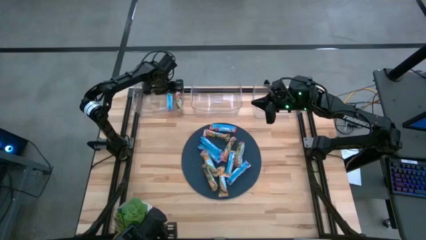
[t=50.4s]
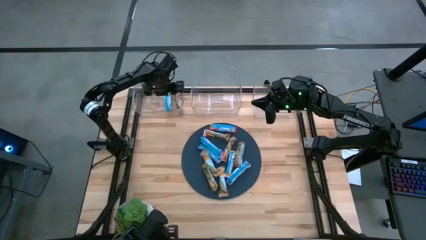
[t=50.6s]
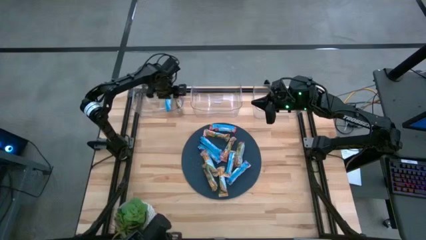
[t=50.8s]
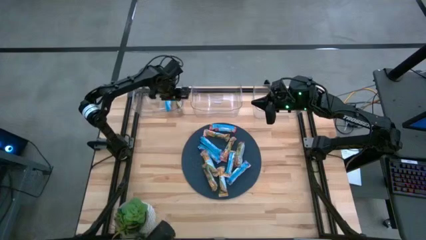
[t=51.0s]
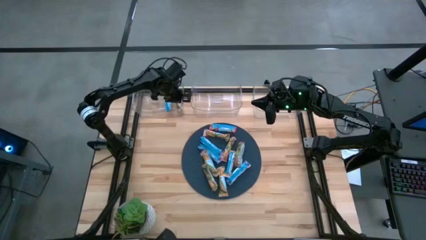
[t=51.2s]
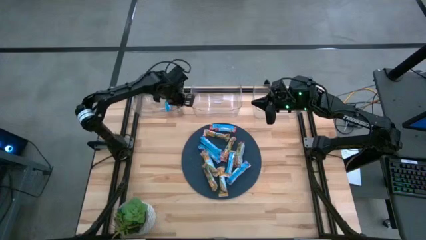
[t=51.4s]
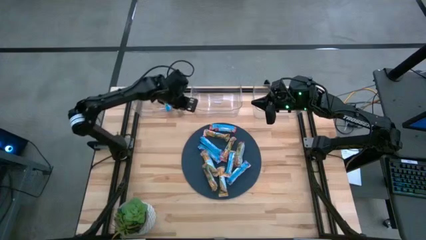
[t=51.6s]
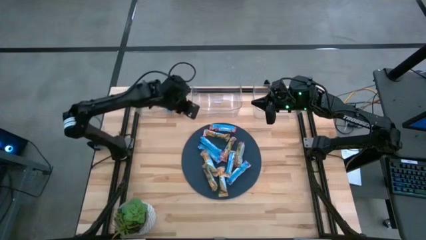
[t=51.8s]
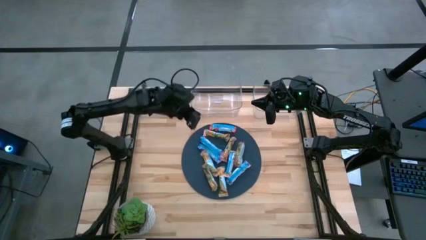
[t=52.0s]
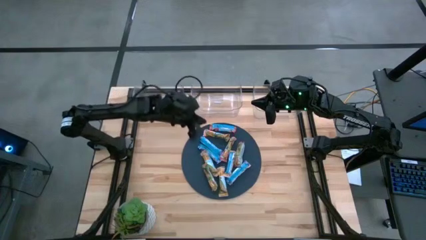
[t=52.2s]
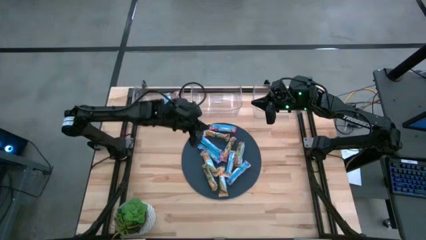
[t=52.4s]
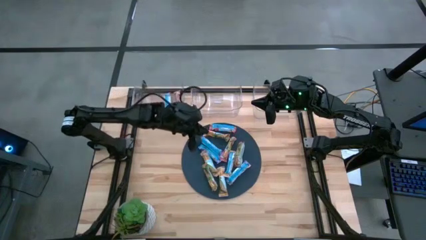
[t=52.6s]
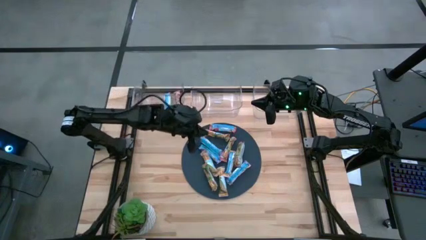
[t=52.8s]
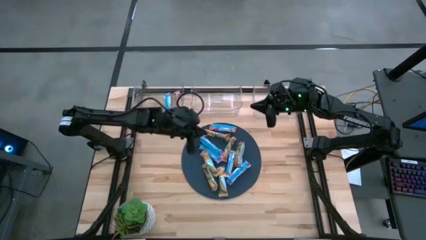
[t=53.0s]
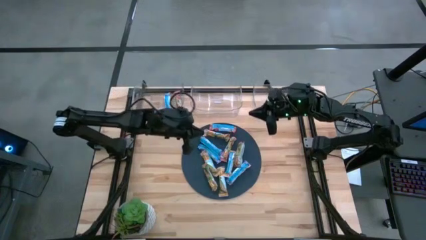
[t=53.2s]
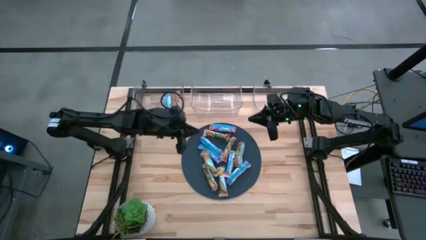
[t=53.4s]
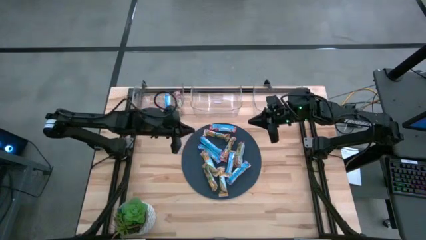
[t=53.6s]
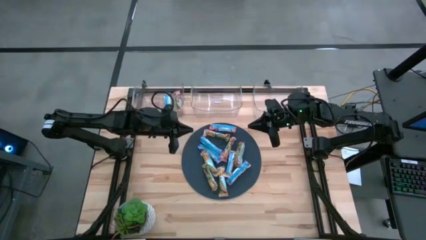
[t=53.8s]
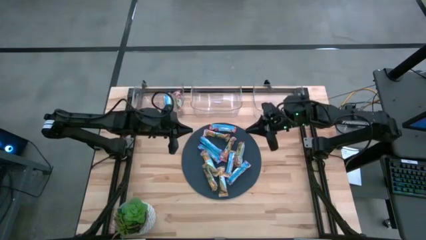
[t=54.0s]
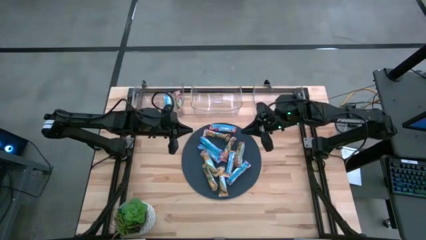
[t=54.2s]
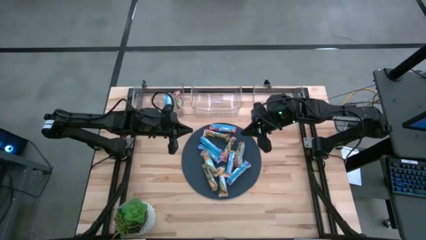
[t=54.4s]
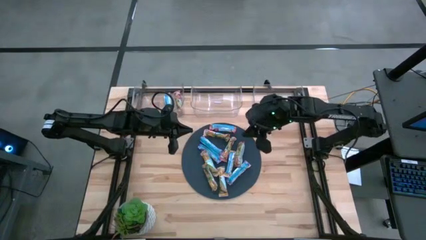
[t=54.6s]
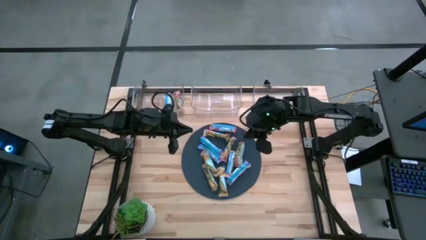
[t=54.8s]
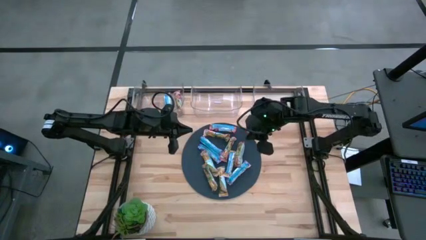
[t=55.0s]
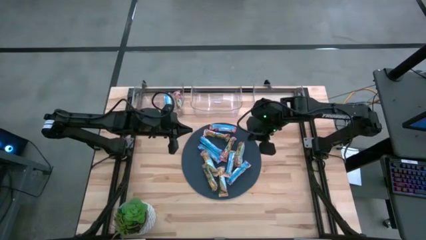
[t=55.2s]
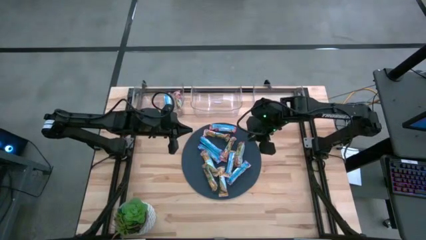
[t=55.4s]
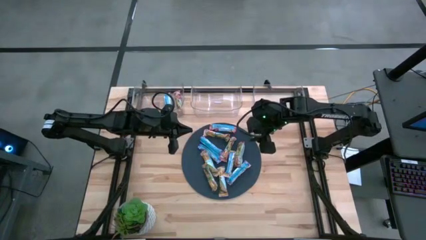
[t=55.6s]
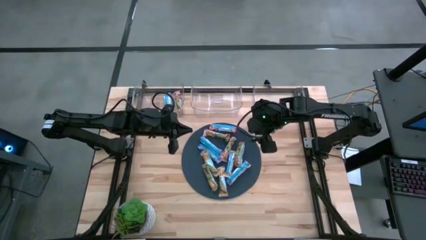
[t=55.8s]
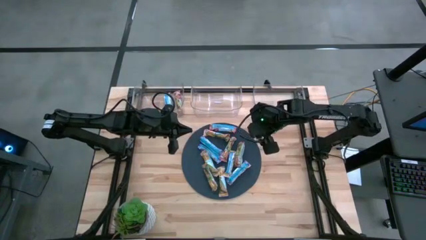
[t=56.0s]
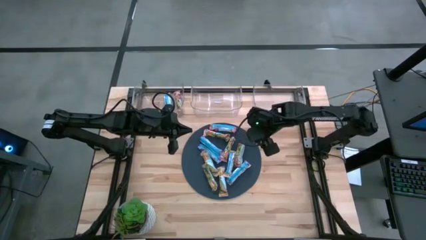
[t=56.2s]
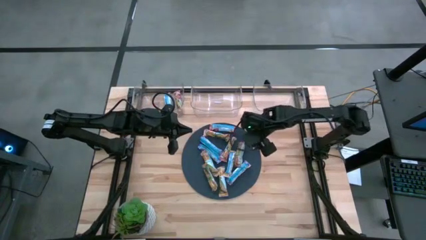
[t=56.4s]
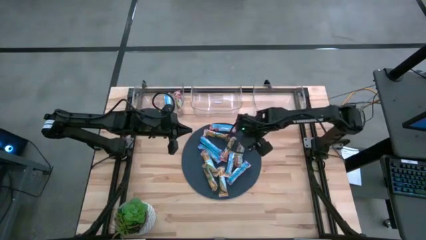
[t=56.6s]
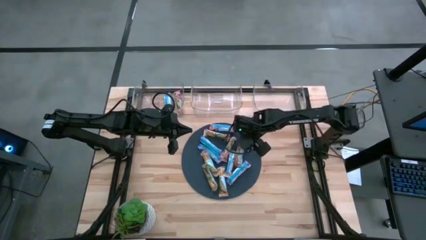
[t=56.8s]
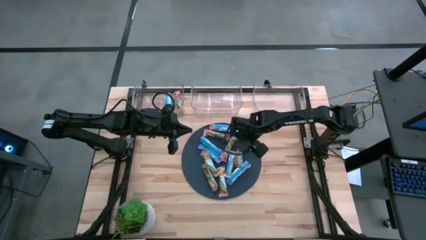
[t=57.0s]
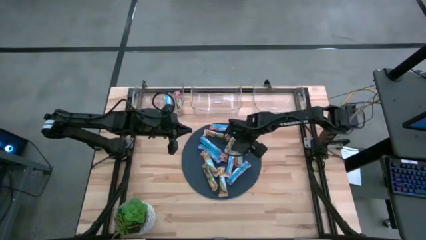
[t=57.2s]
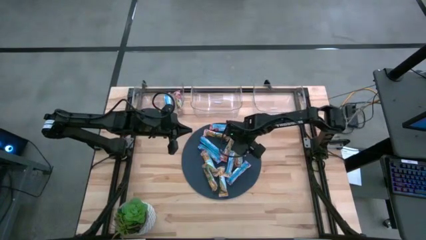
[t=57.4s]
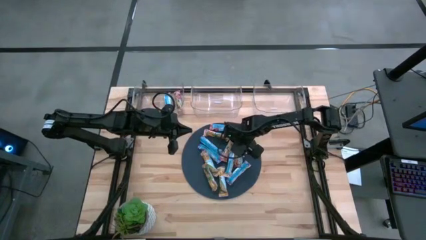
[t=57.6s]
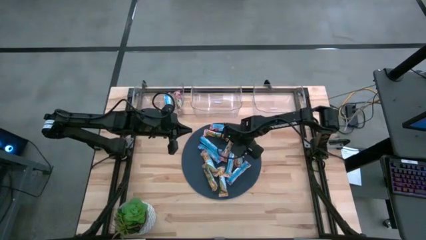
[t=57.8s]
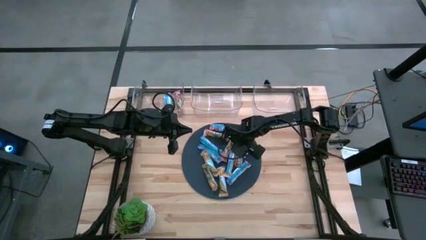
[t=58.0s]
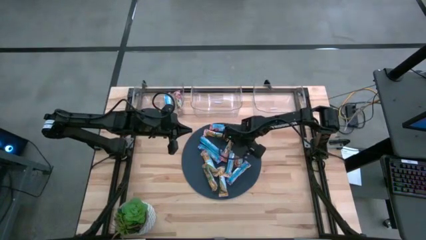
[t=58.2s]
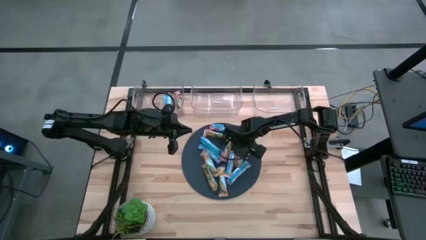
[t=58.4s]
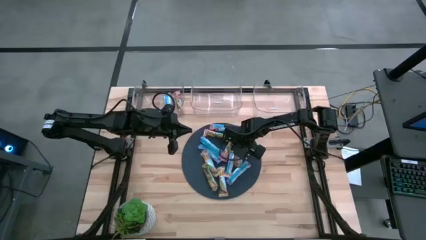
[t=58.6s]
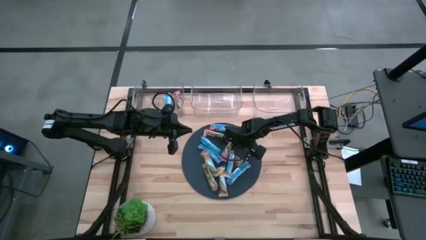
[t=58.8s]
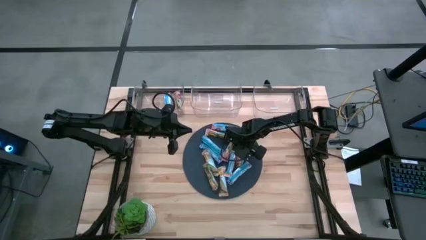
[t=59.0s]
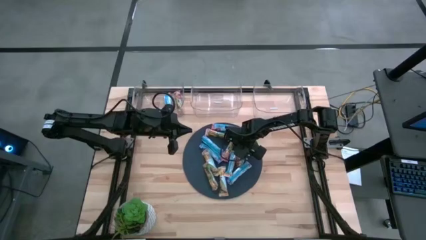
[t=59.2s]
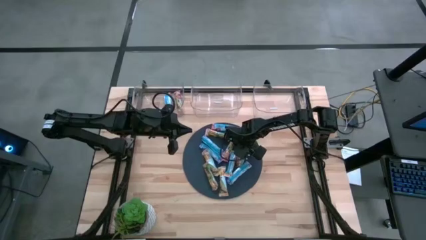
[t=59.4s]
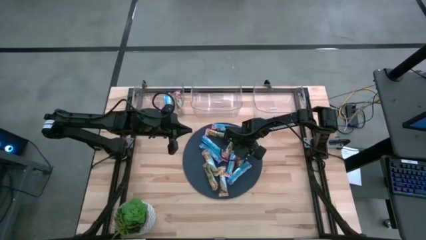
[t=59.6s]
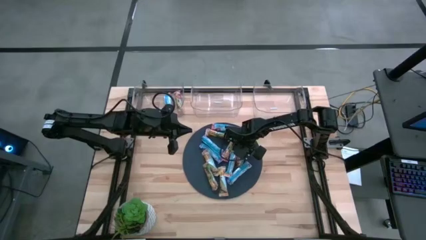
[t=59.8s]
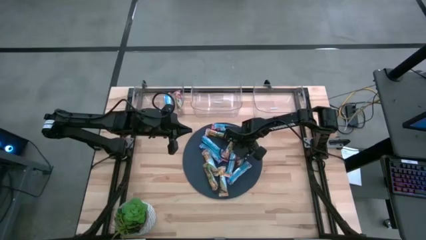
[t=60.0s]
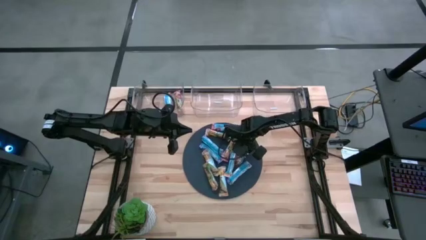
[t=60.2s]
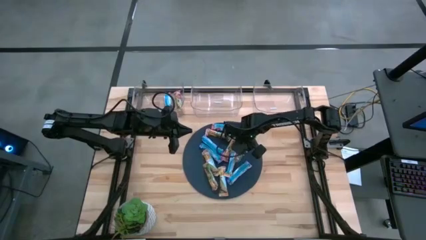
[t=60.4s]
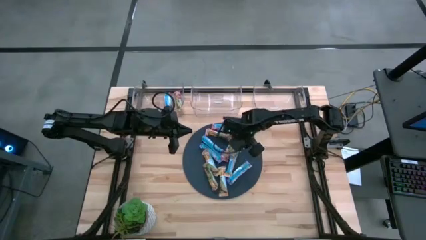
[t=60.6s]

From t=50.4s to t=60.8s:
Task: Pick and place Granola Bars by type
Put the red granola bar into the left transparent bin
